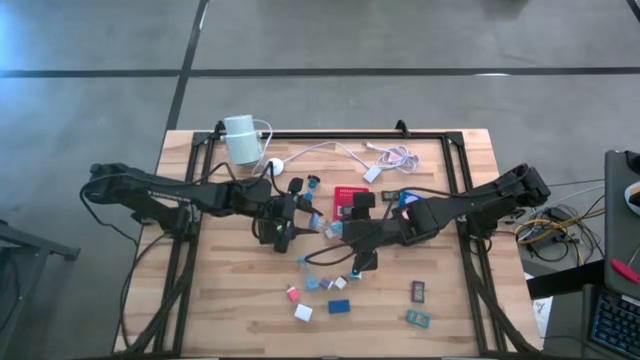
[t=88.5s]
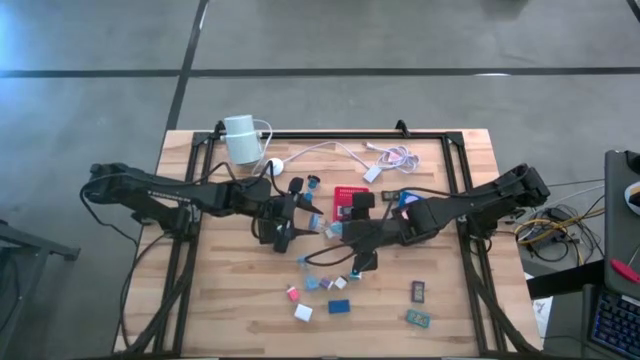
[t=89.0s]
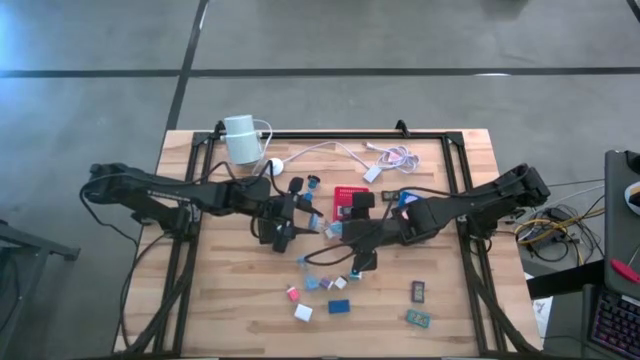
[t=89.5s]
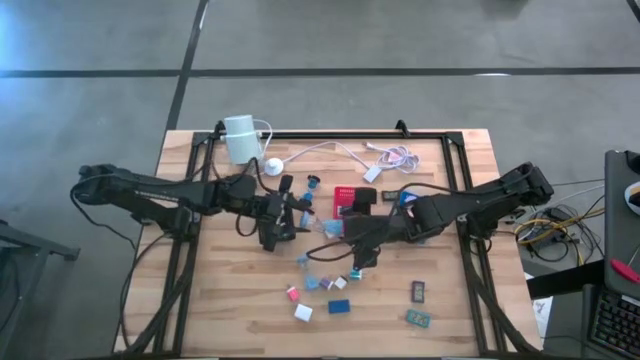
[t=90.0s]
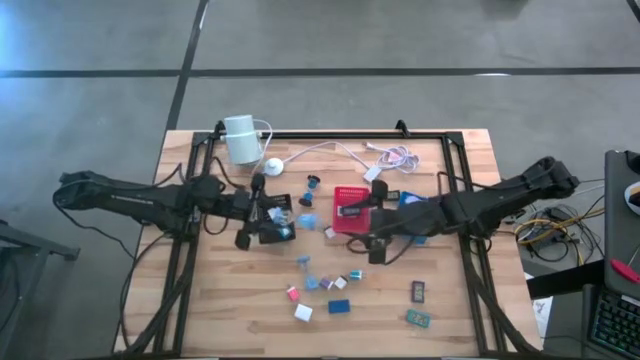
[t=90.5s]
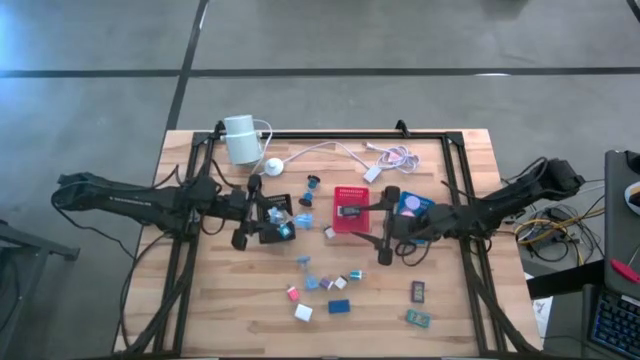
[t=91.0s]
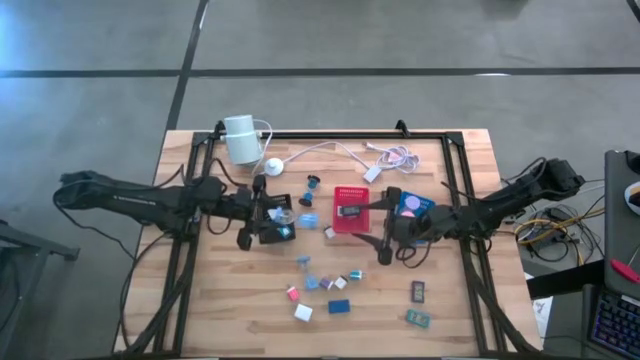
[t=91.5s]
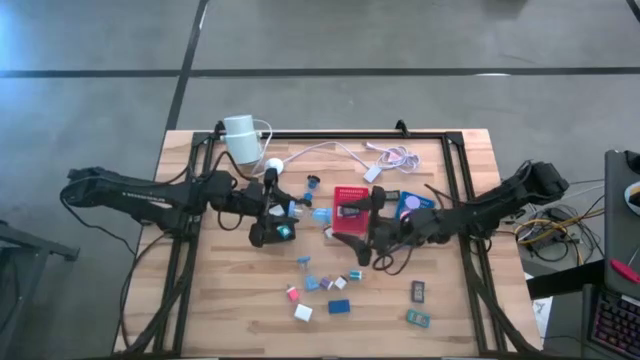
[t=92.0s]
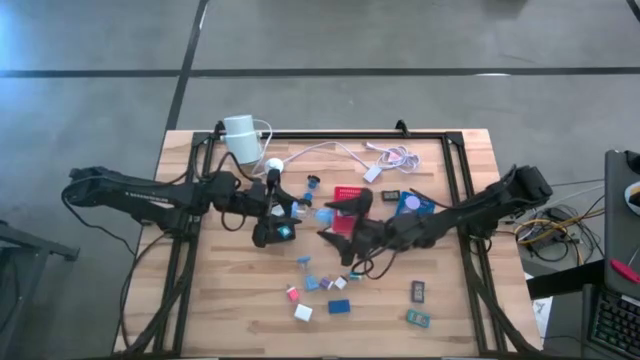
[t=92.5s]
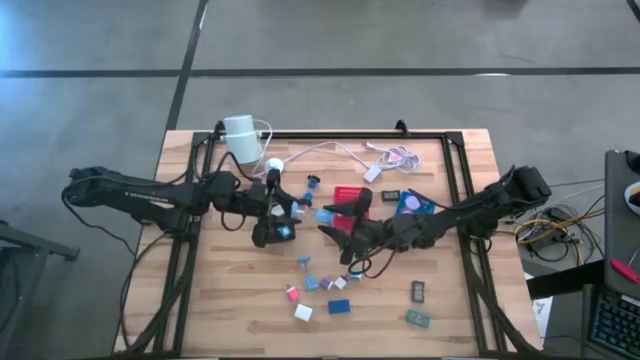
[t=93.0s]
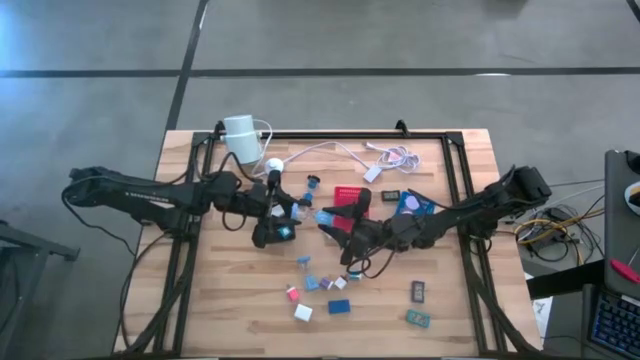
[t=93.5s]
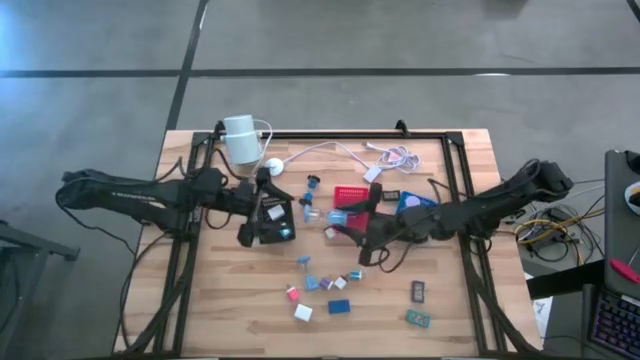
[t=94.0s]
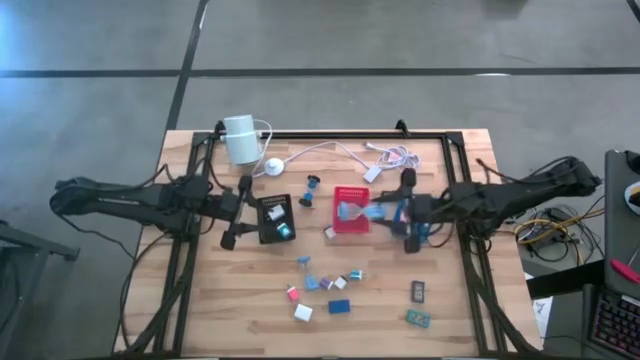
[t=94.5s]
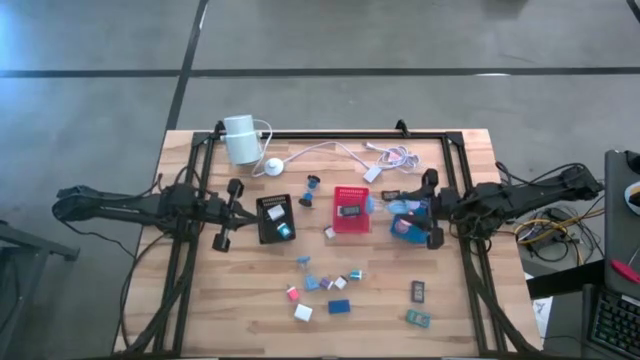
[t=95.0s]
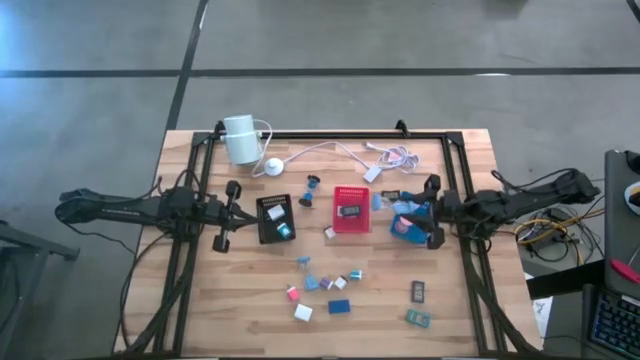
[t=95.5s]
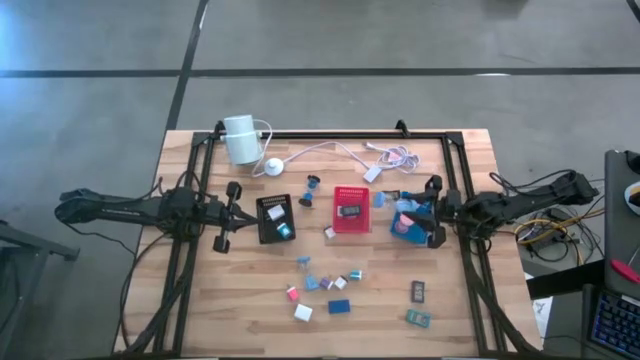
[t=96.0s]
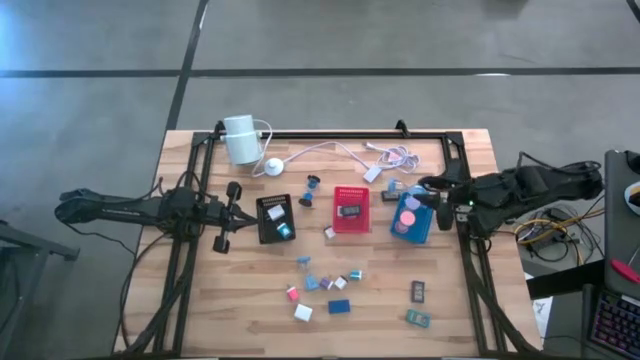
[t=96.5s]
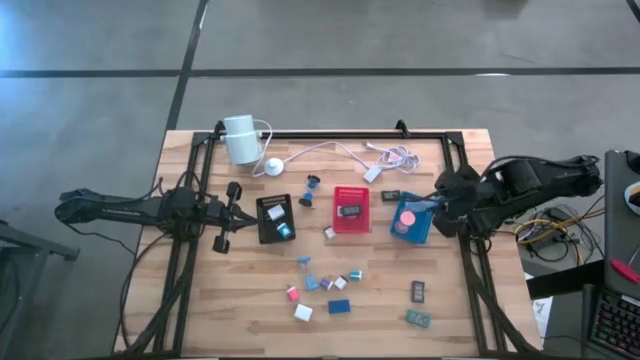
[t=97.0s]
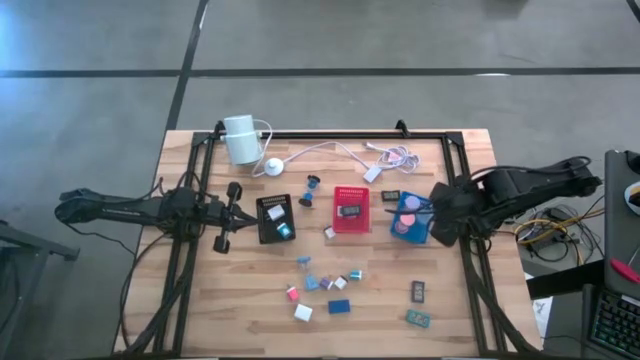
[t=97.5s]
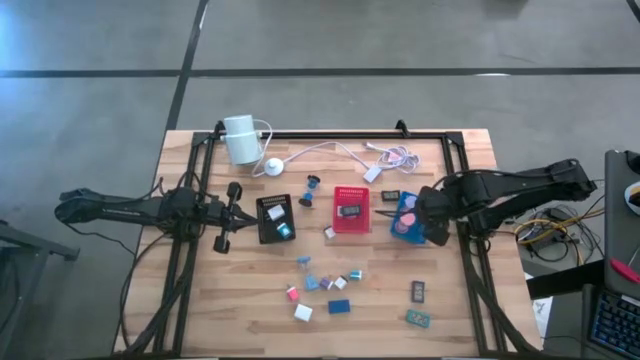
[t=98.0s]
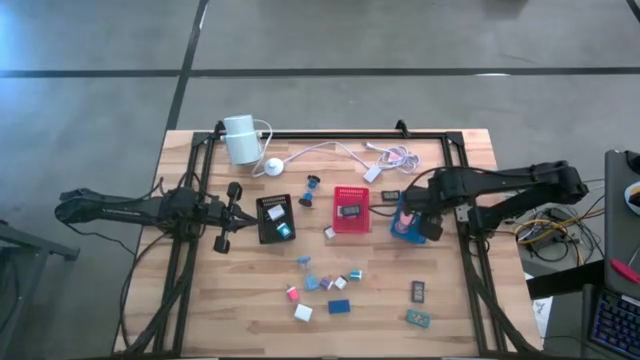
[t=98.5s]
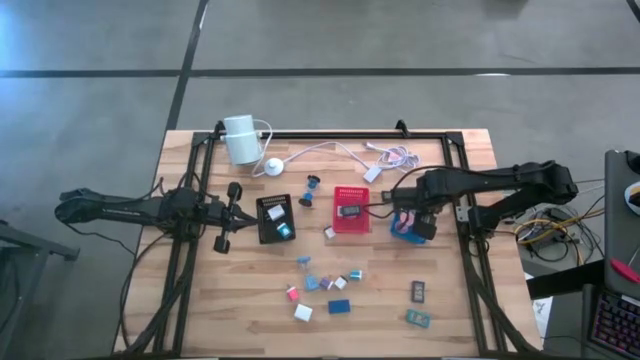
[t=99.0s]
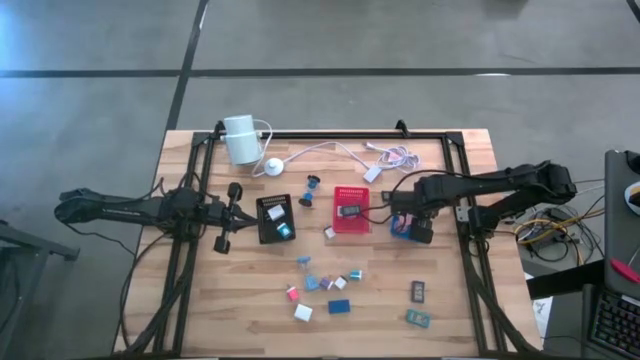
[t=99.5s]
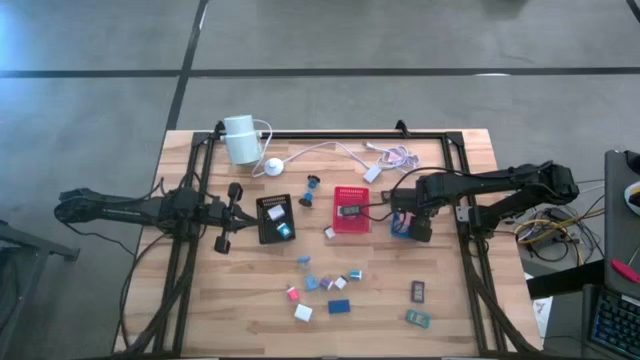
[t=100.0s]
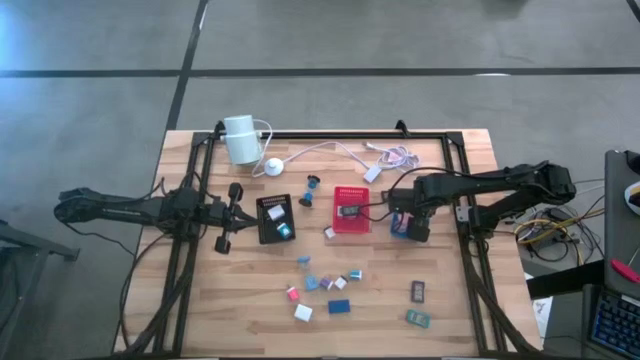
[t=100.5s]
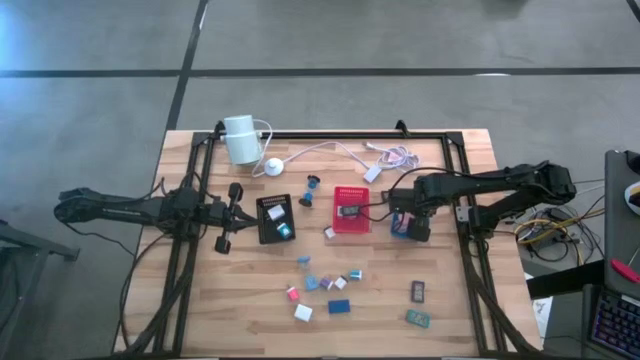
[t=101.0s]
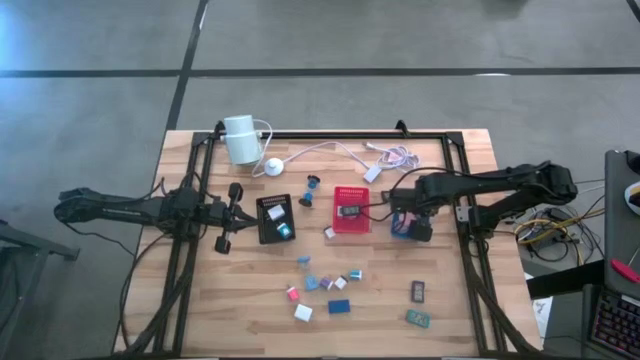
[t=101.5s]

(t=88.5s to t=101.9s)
Task: Pick & Place Office items
Put the right light blue hourglass into the blue bin

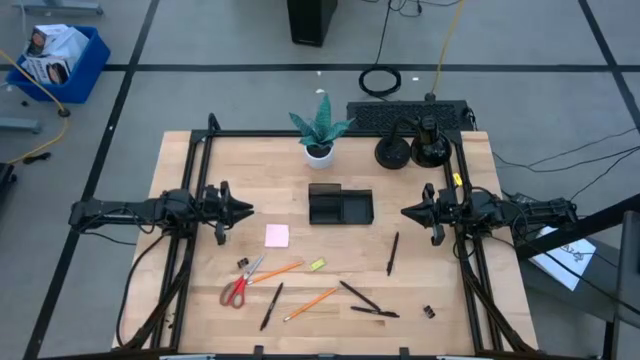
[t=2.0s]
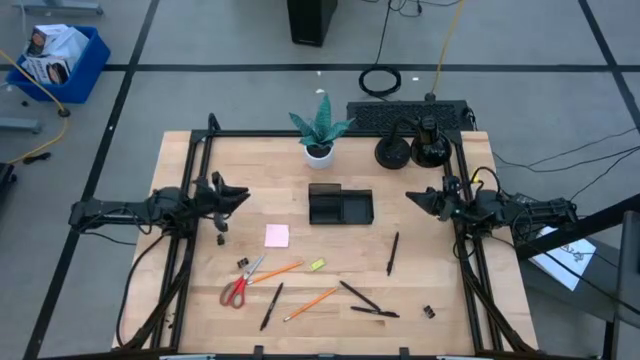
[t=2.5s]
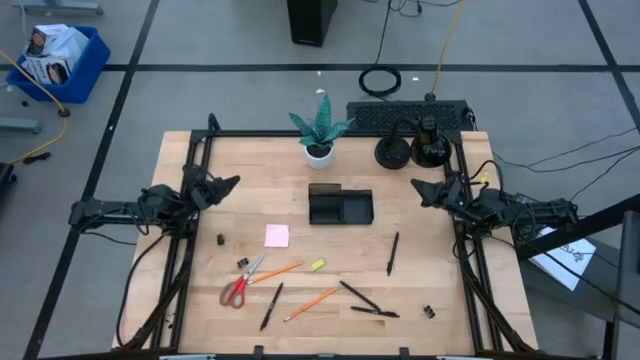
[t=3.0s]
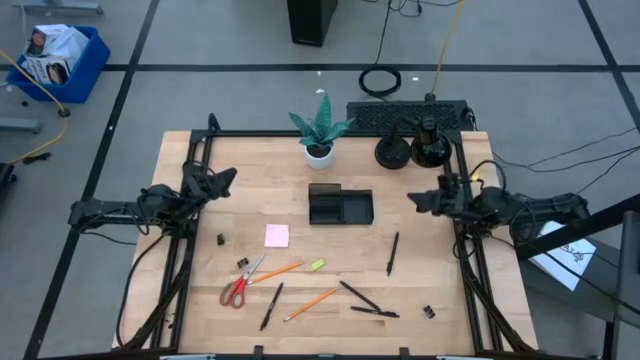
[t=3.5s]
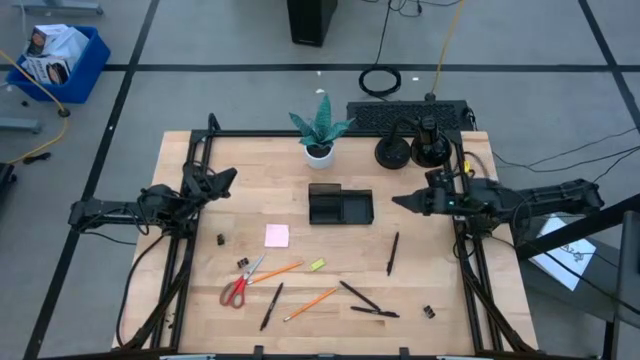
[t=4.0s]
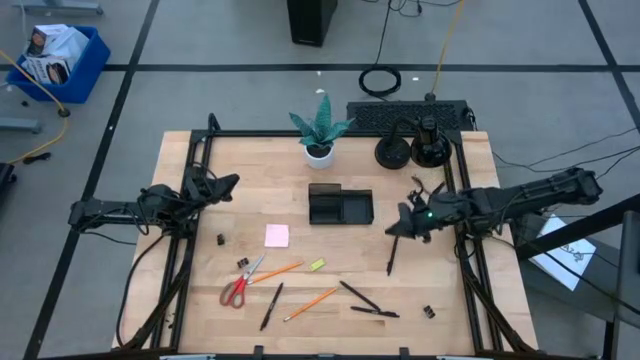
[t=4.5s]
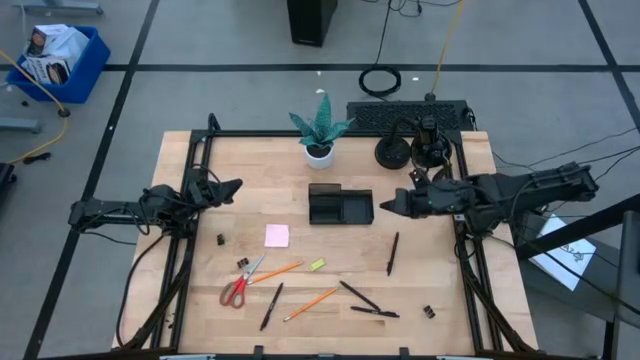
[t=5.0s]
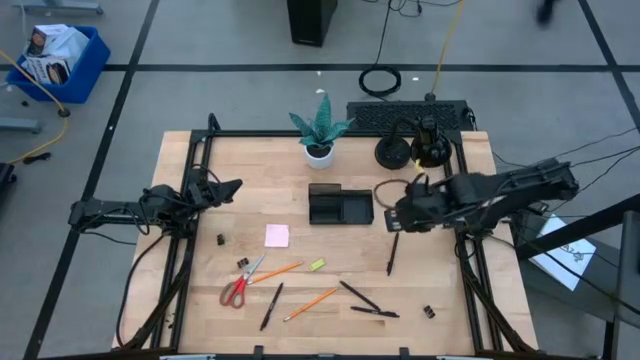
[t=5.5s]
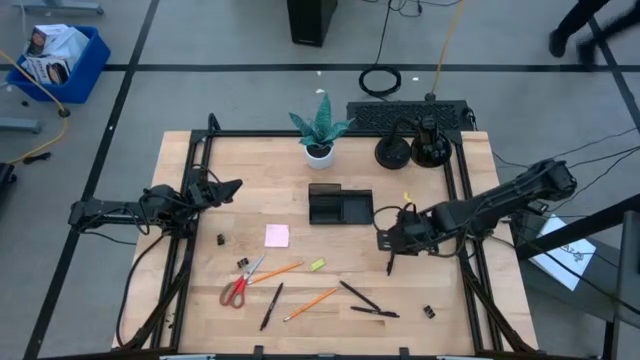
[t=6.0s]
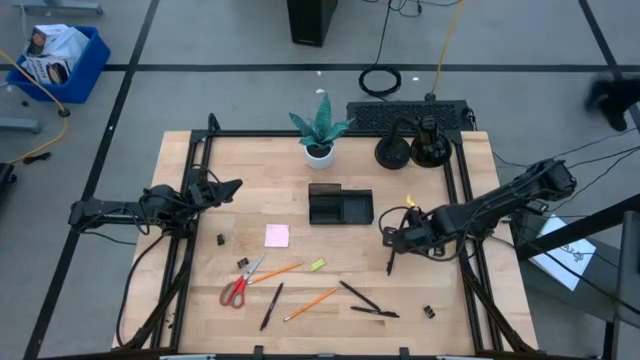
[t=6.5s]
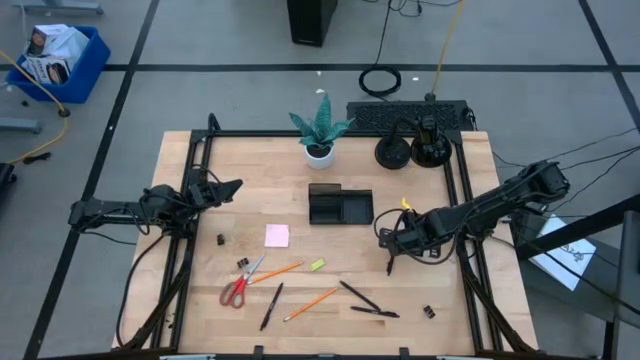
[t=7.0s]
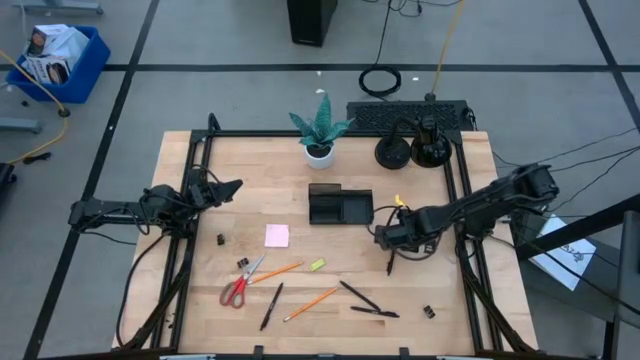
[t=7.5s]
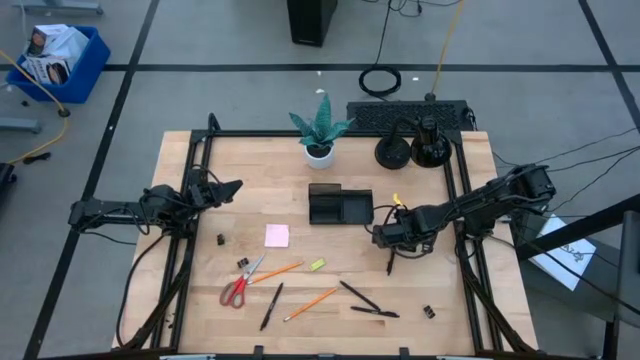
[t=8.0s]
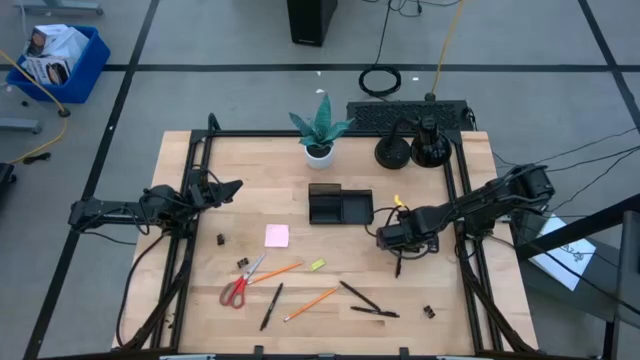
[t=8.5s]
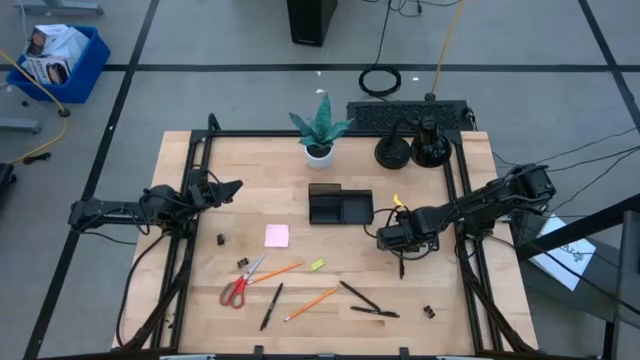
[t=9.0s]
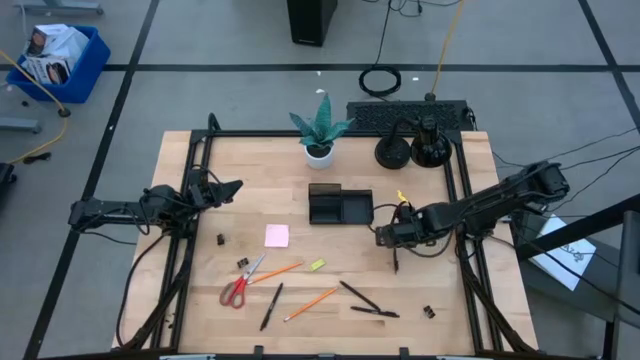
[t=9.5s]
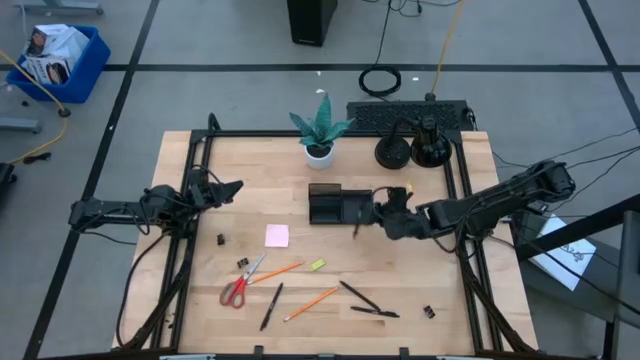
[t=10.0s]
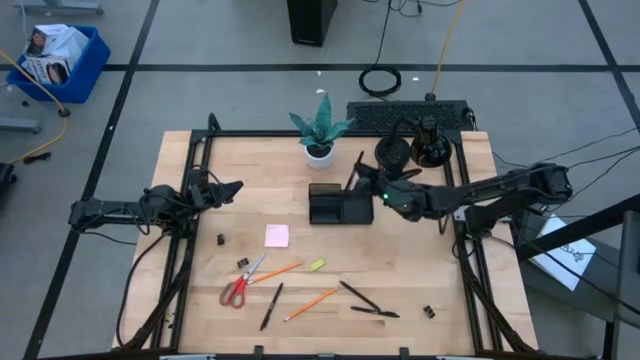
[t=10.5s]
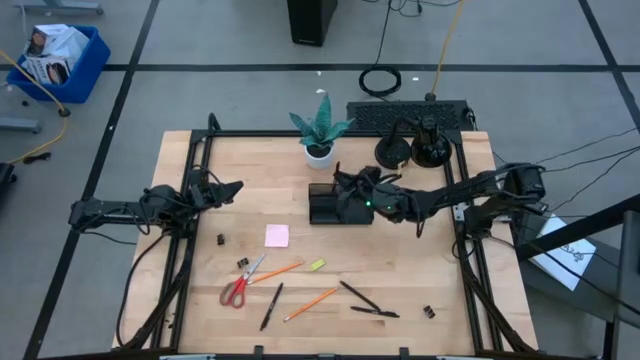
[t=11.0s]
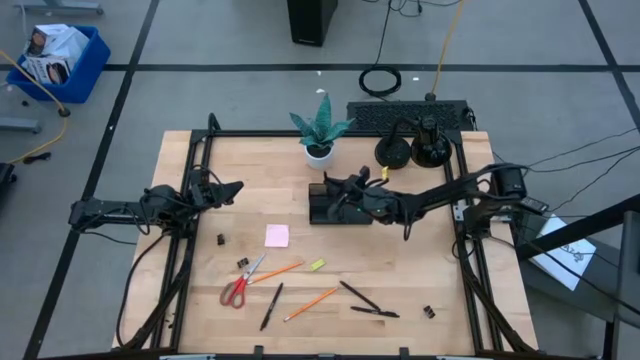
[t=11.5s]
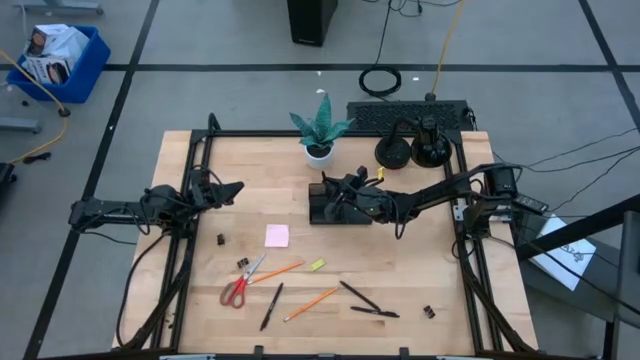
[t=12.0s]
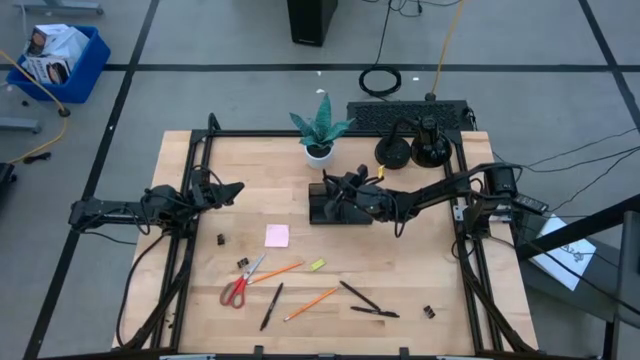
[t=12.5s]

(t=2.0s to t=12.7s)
Task: Pick and place office supplies into organizer
Put the black pen into the black desk organizer
